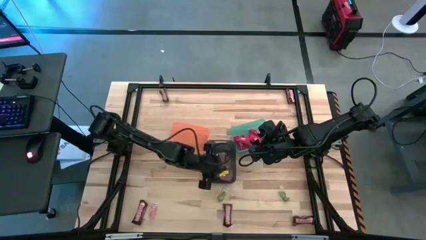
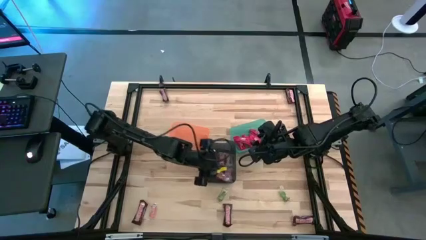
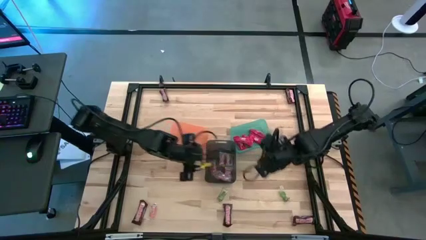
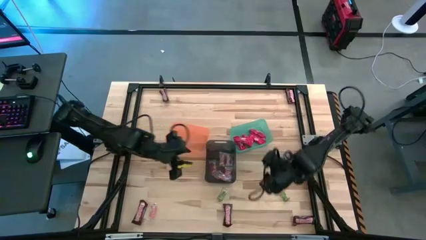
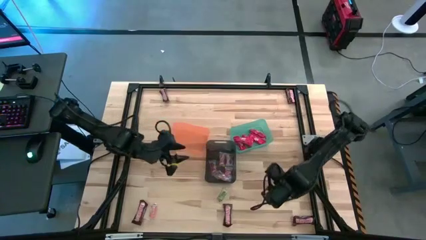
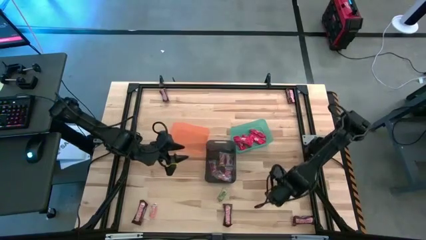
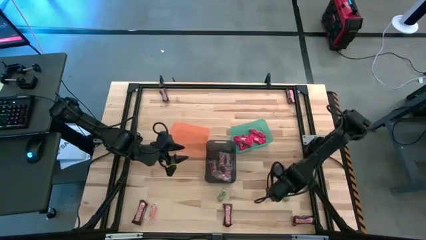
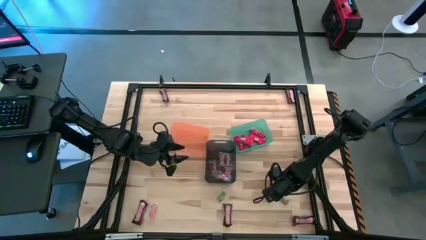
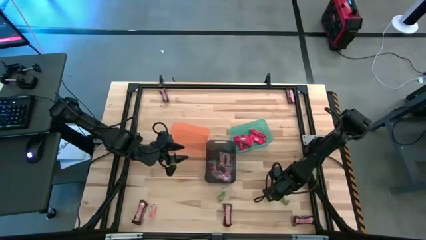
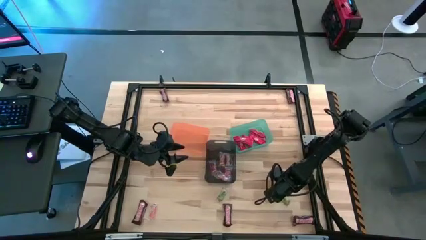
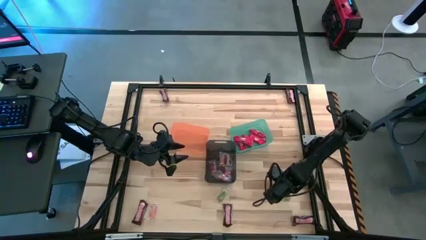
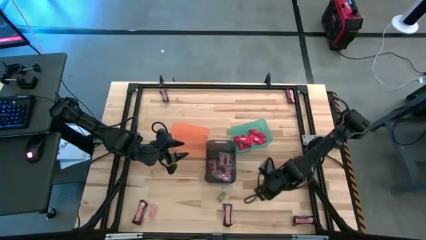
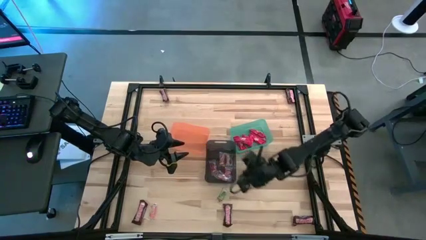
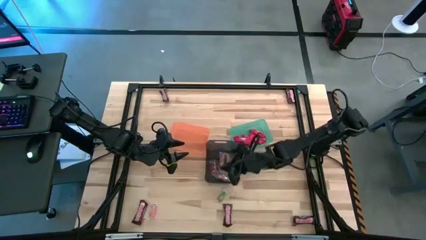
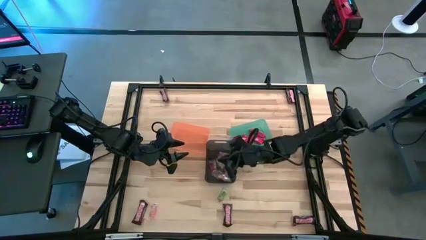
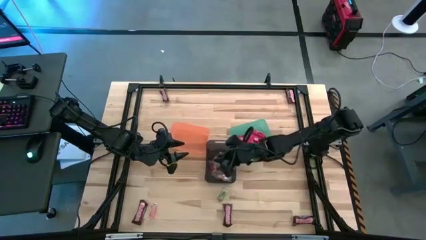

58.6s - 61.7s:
Task: Sort candy by brand, put in halloween buckets
Put the green gummy into the black bin

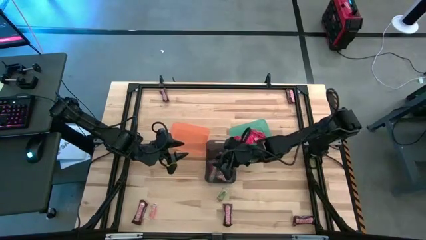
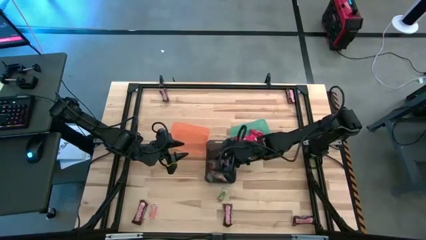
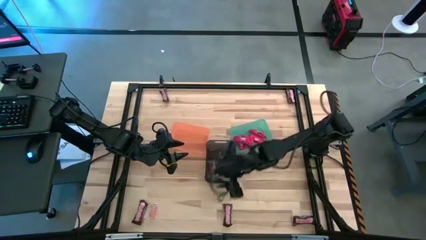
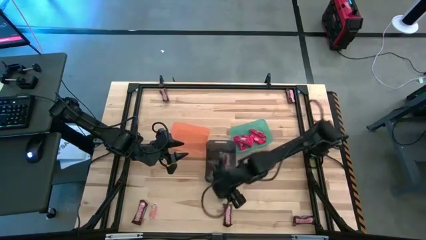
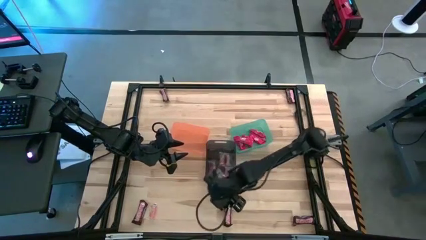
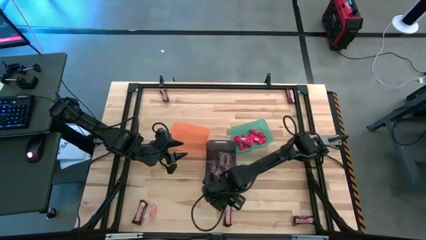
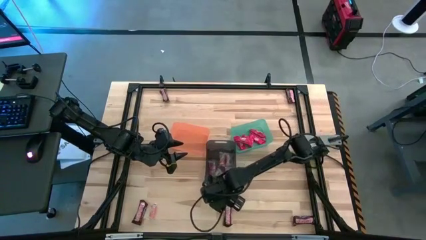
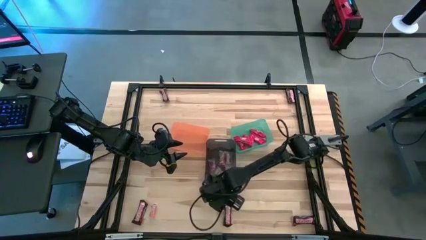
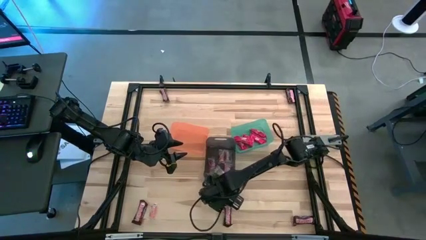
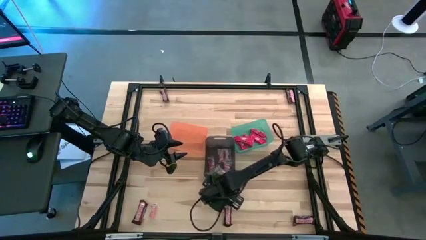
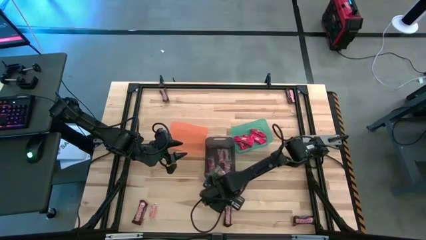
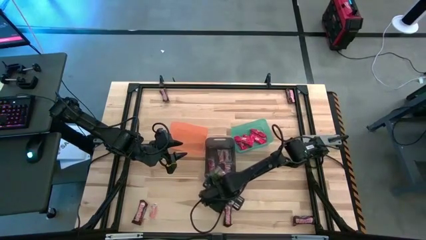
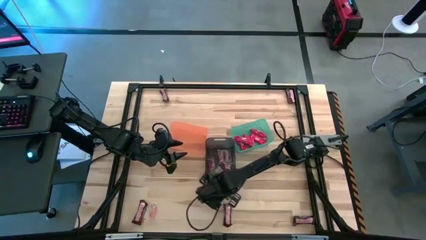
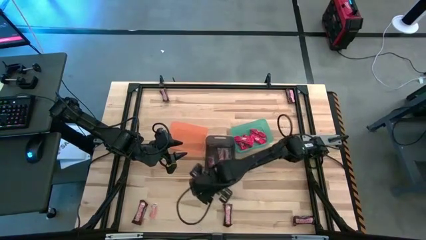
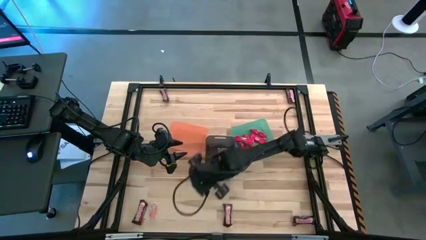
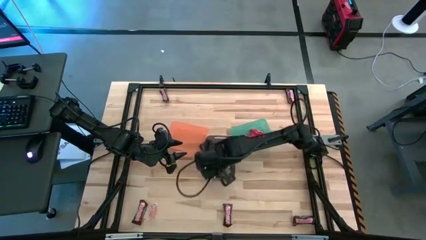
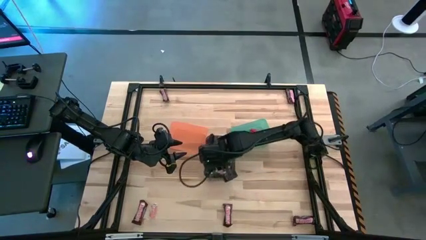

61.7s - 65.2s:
Put the green gummy into the black bin

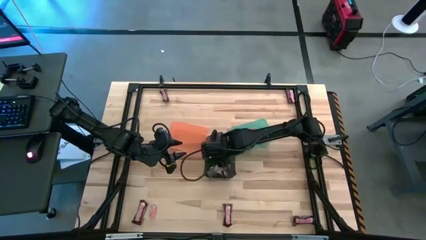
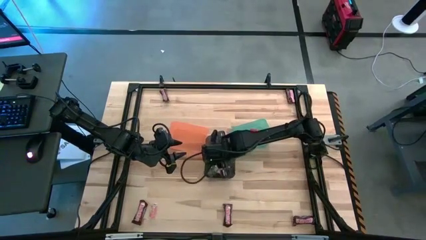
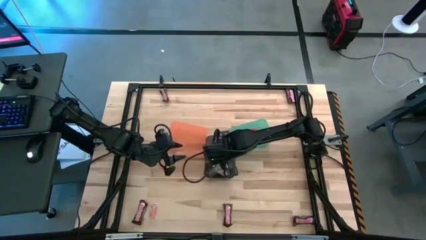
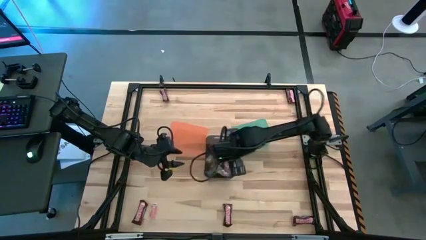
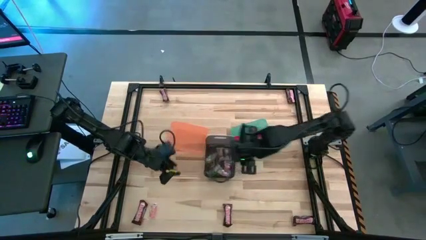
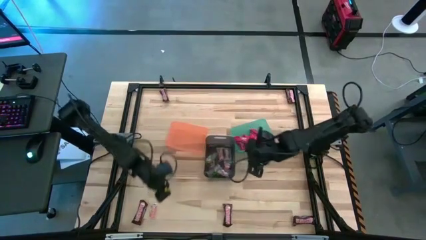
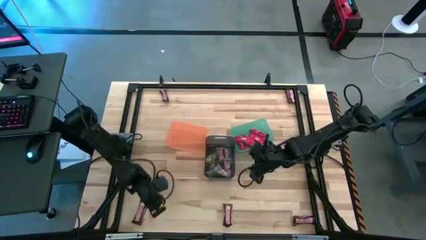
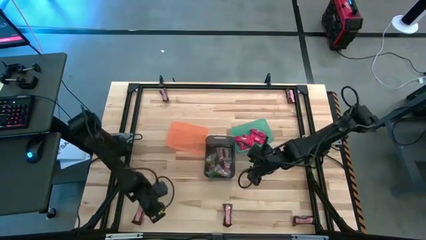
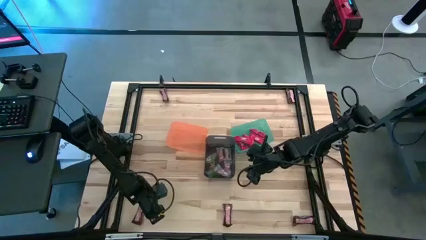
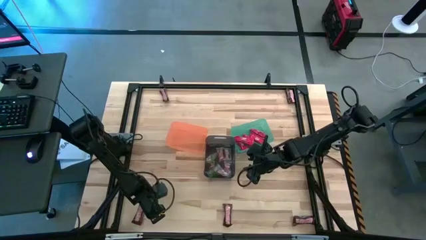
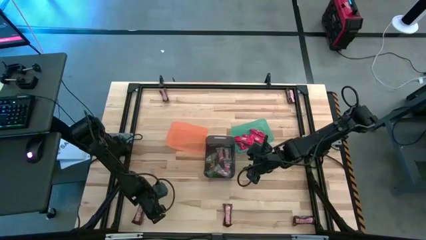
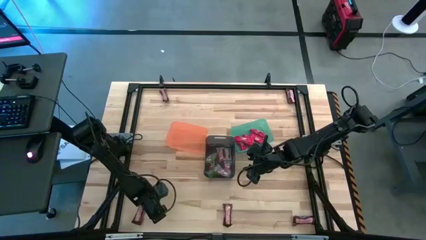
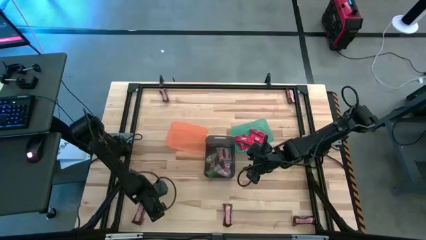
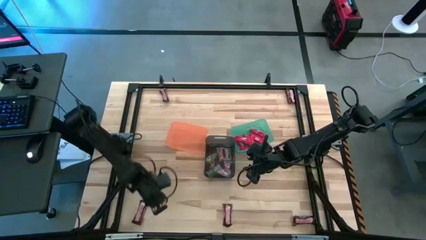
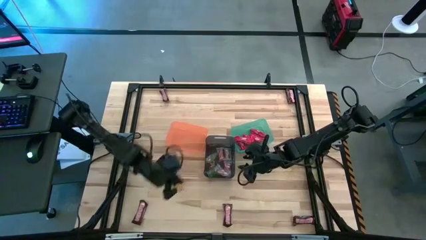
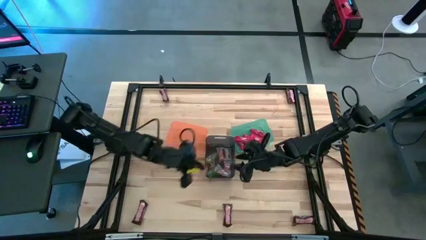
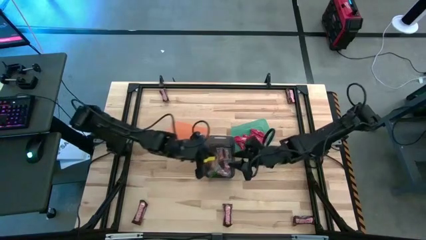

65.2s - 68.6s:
Put the orange gummy into the black bin

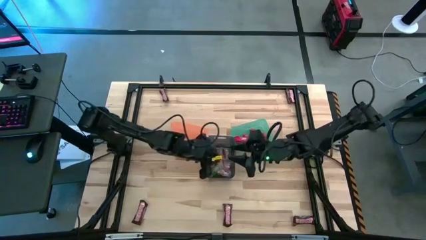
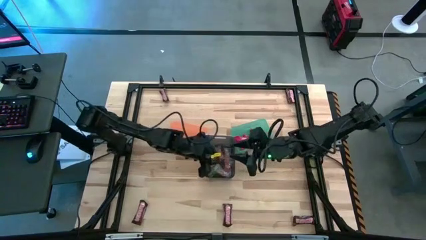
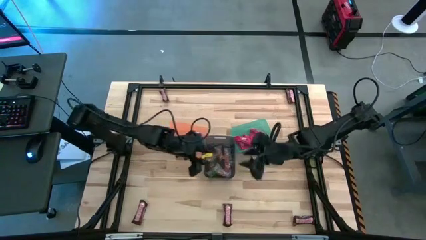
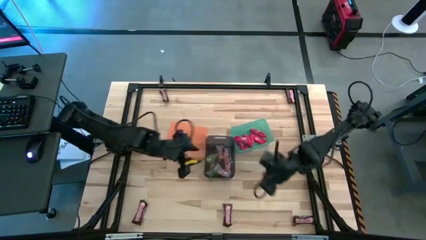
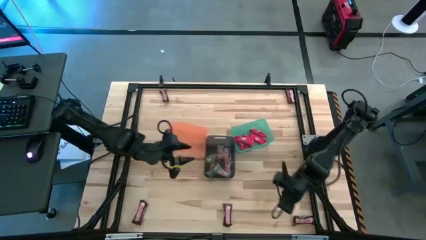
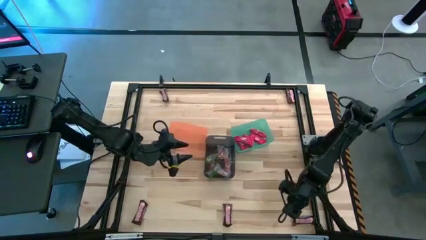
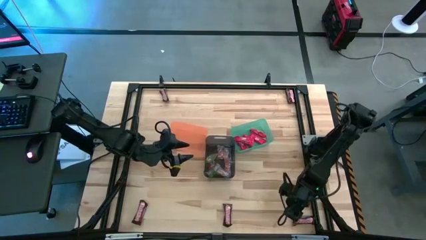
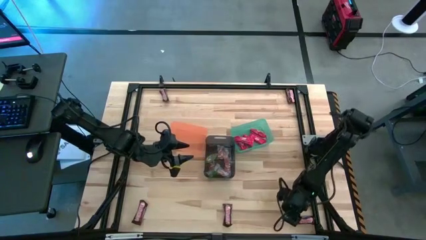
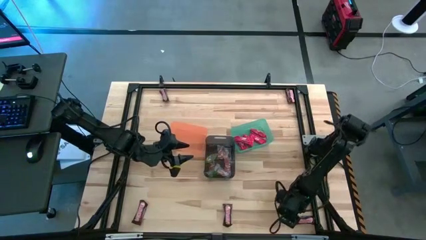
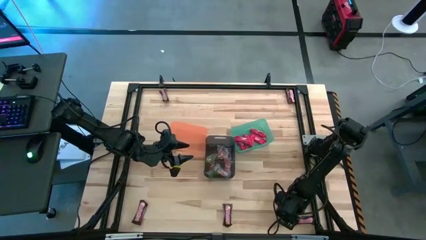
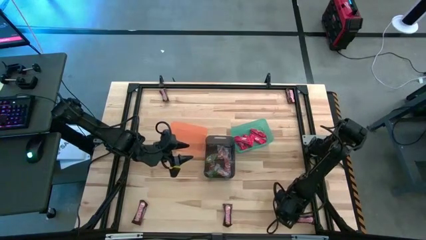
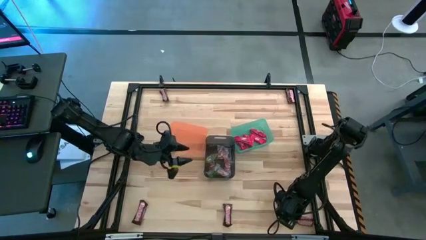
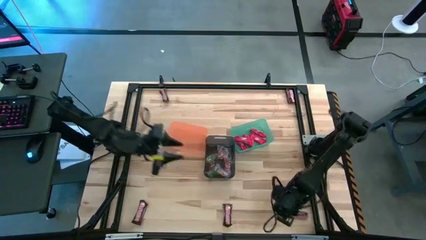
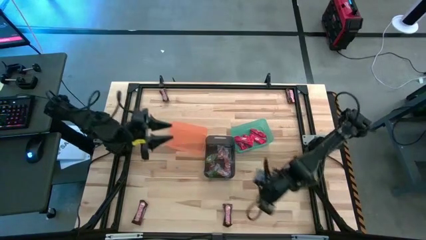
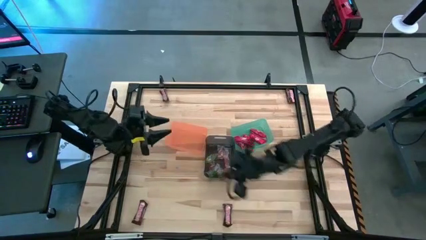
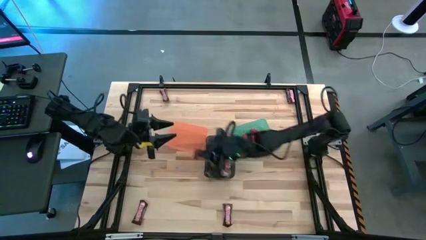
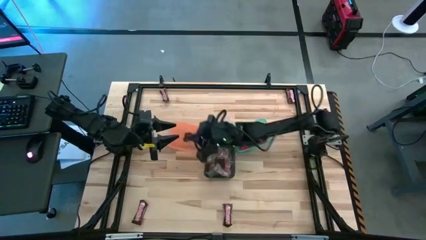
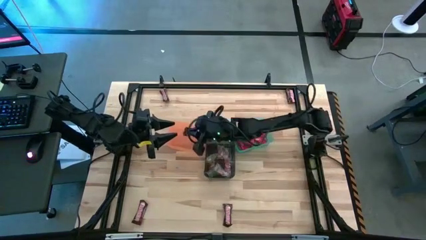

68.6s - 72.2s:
Put the brown chocolate bar into the orange bin

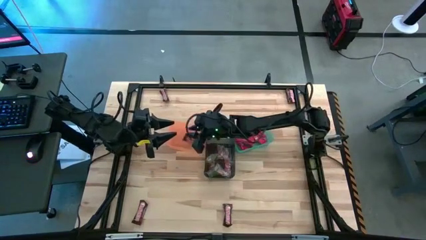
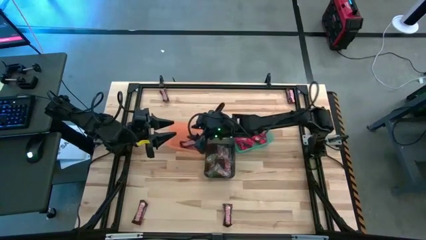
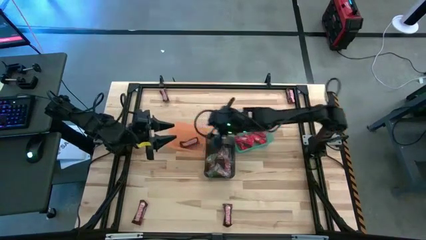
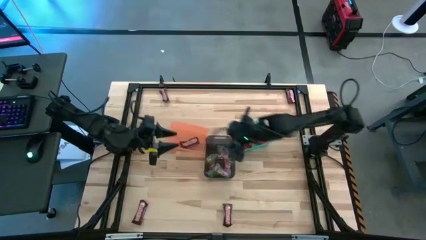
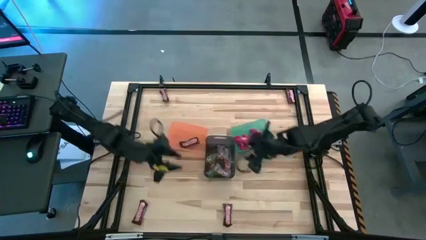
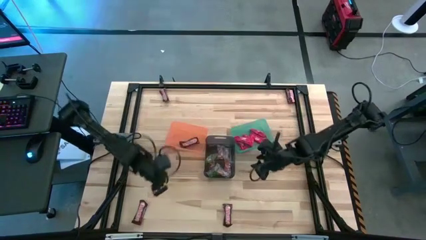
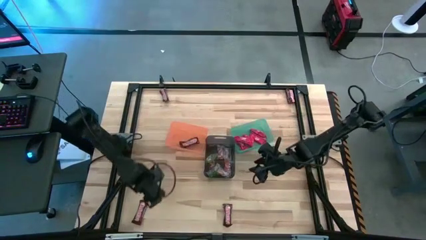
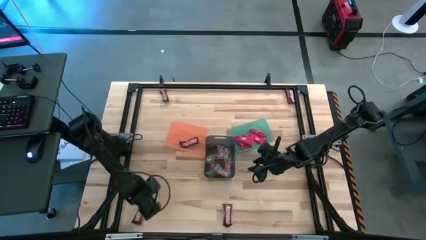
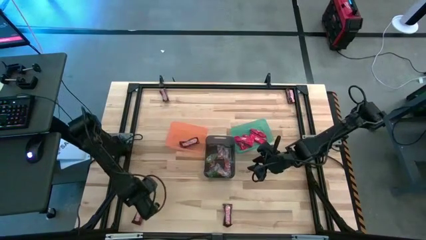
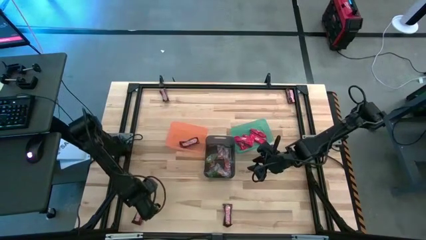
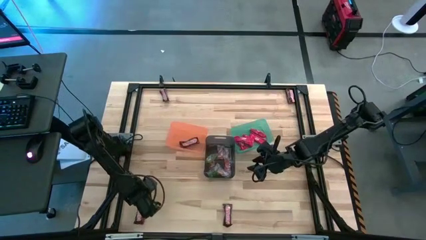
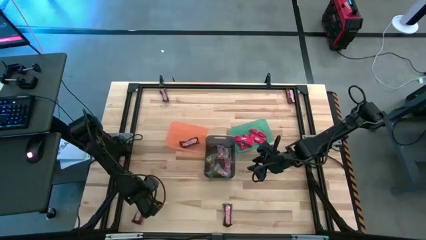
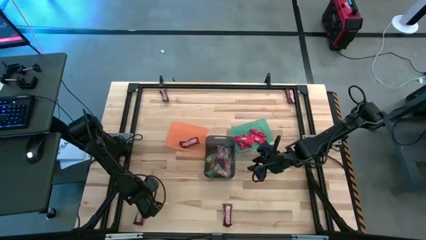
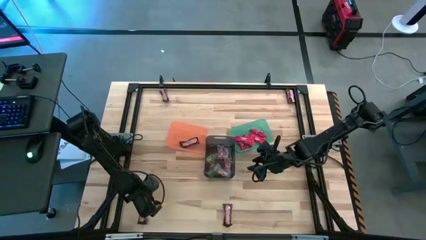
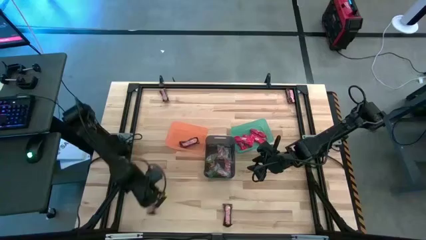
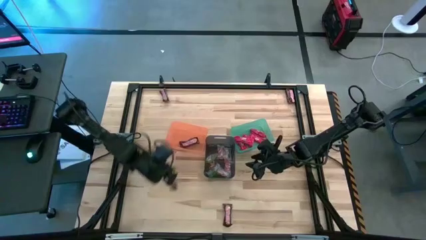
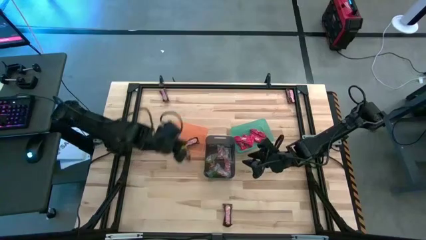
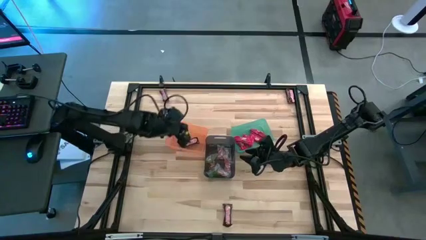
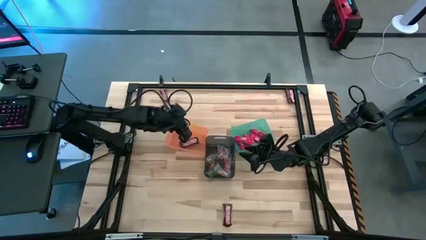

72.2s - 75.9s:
Put the brown chocolate bar into the orange bin
